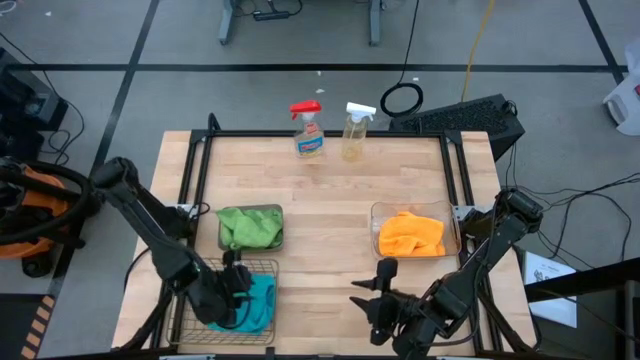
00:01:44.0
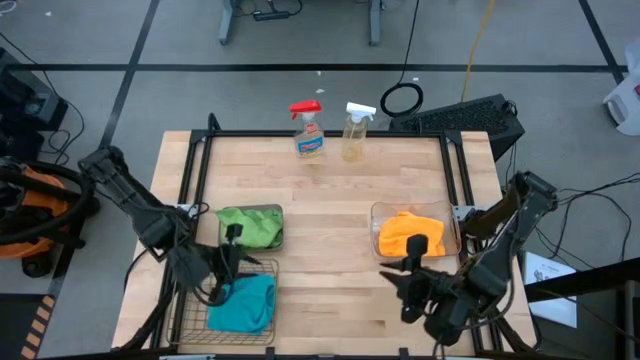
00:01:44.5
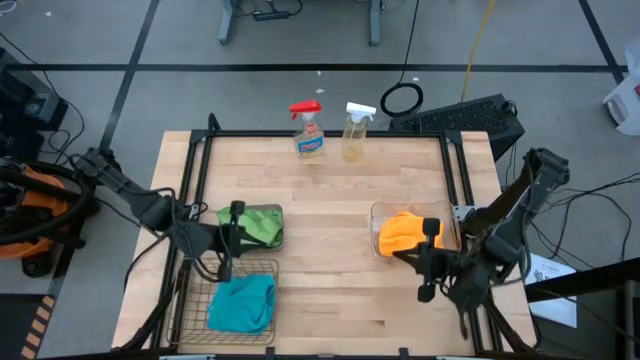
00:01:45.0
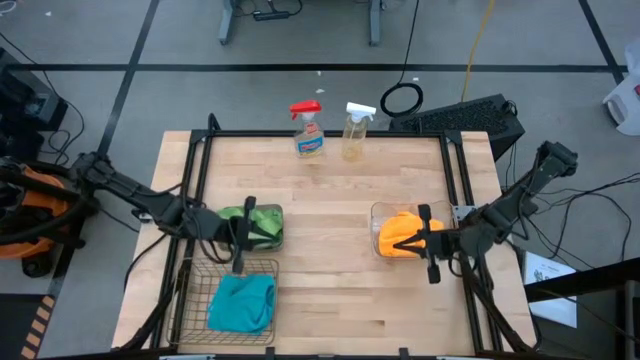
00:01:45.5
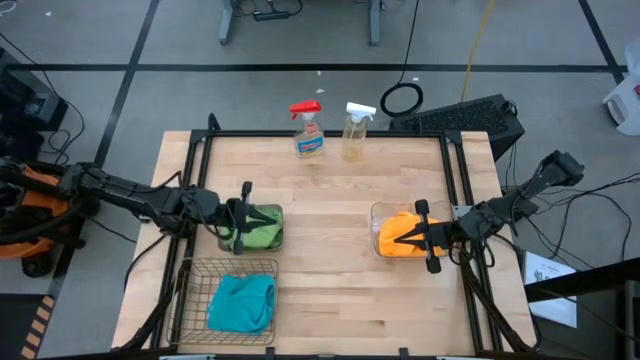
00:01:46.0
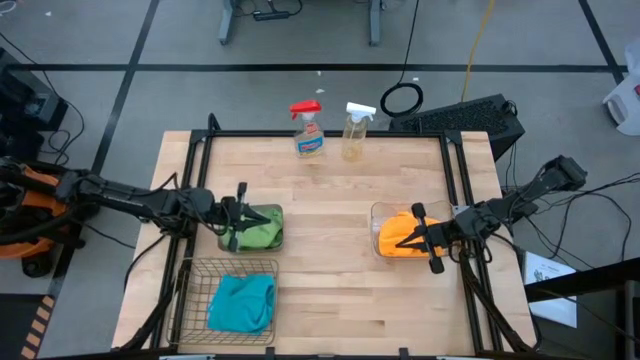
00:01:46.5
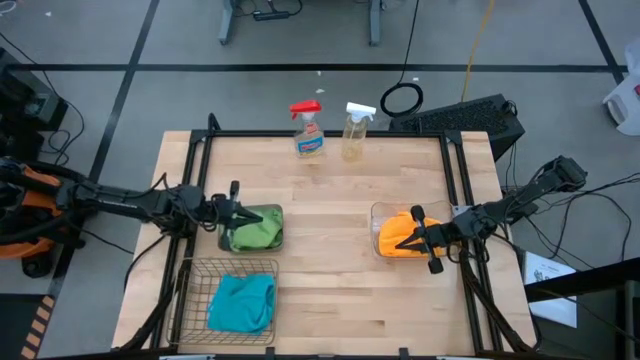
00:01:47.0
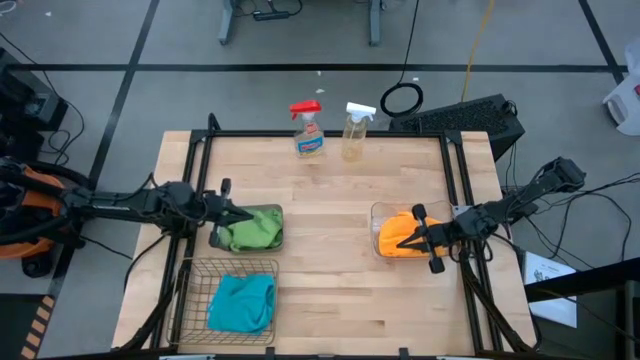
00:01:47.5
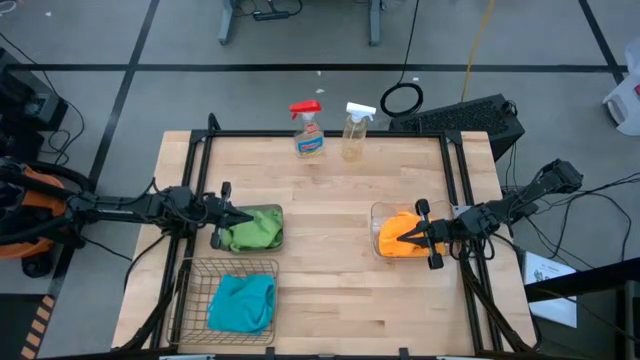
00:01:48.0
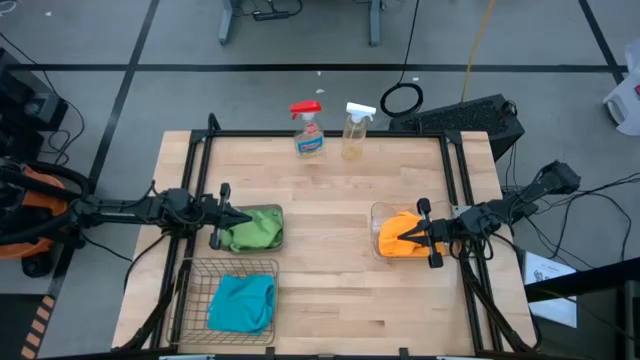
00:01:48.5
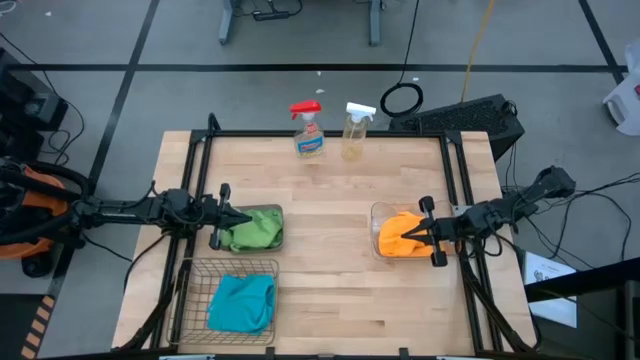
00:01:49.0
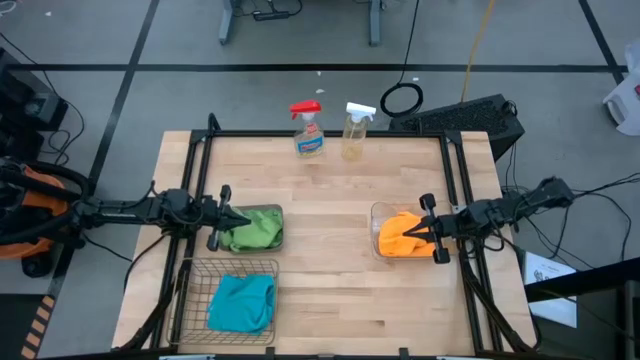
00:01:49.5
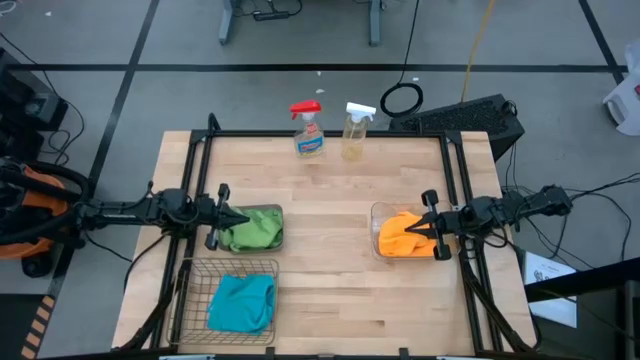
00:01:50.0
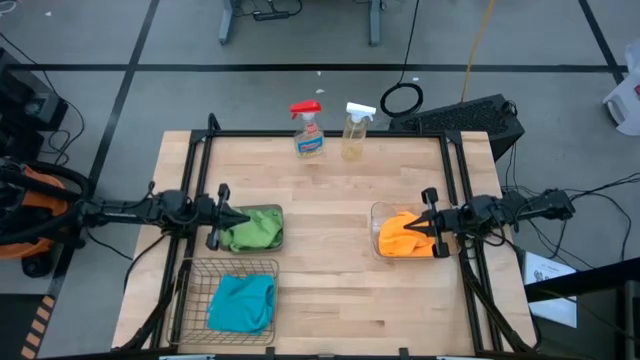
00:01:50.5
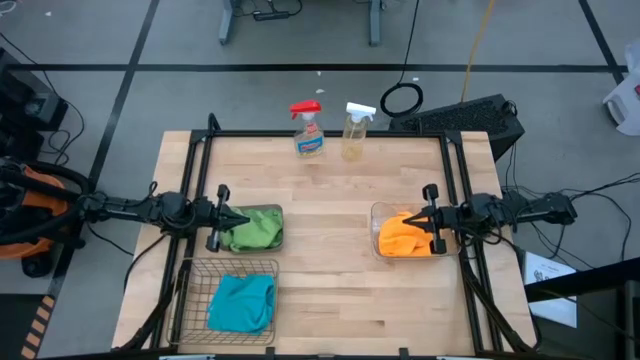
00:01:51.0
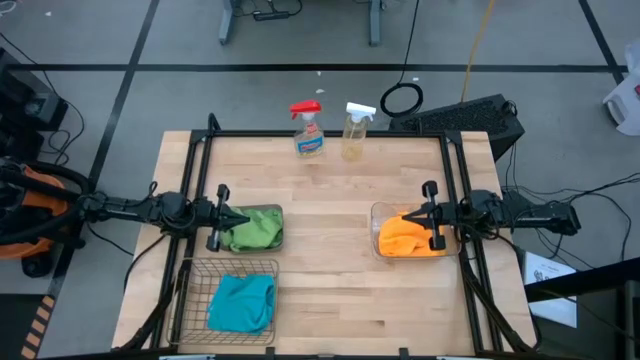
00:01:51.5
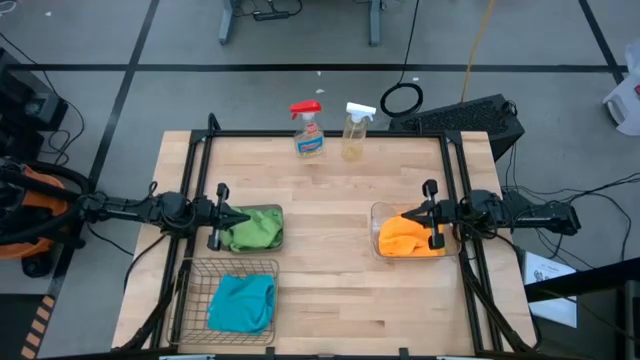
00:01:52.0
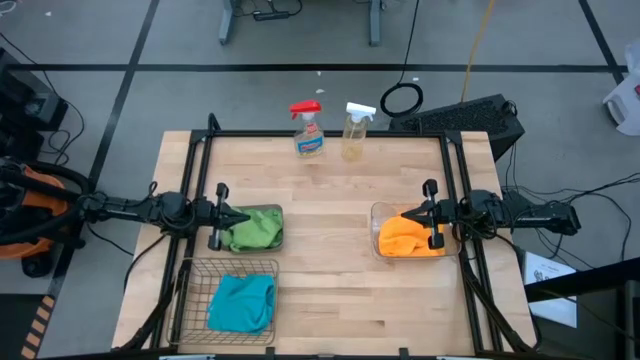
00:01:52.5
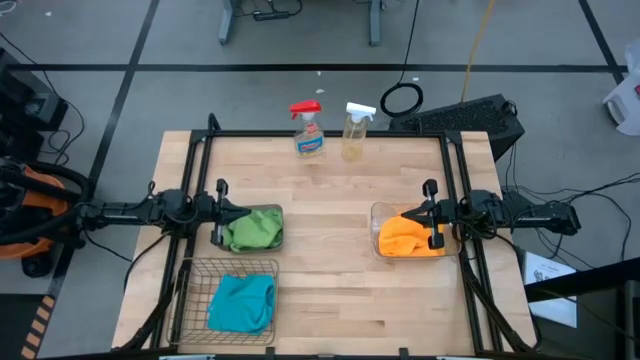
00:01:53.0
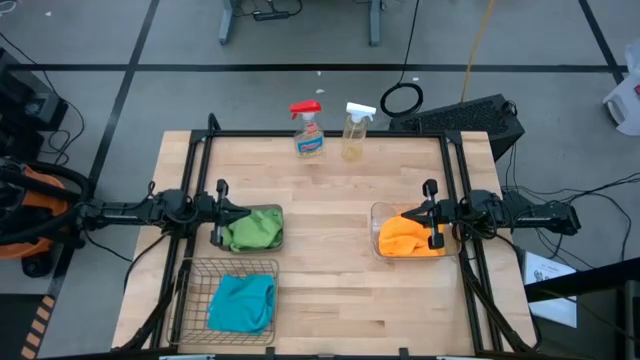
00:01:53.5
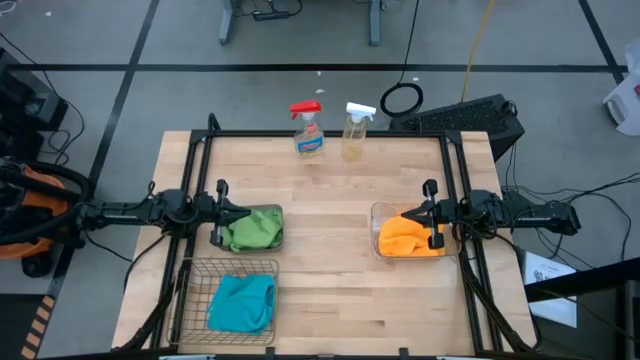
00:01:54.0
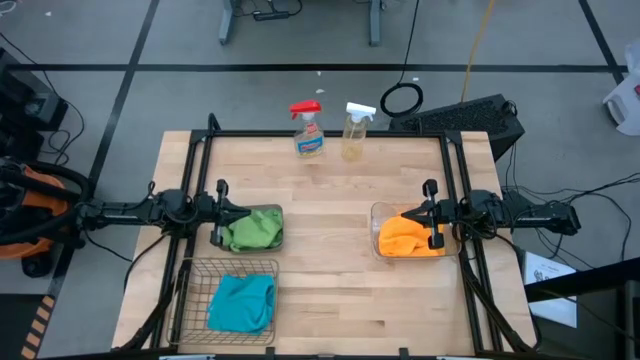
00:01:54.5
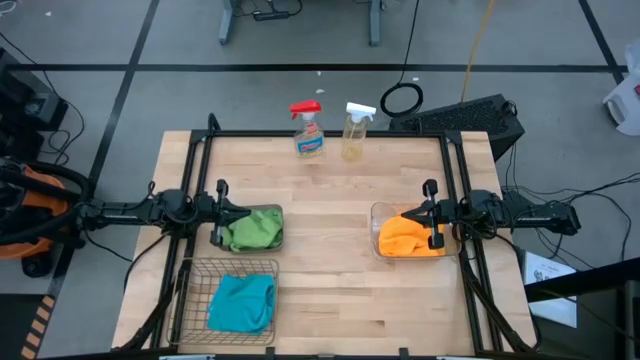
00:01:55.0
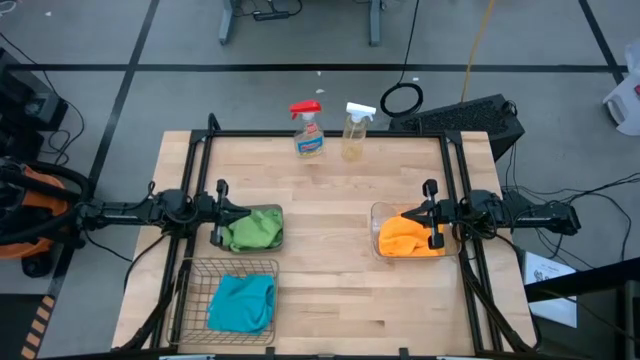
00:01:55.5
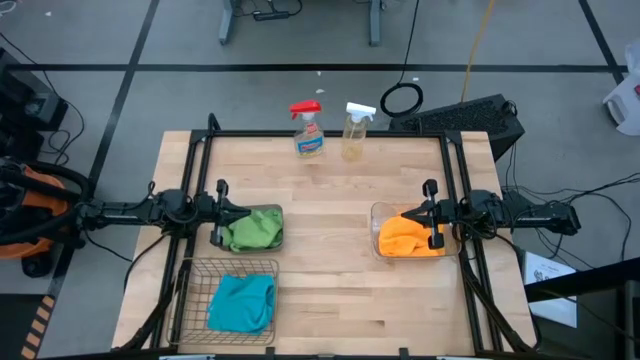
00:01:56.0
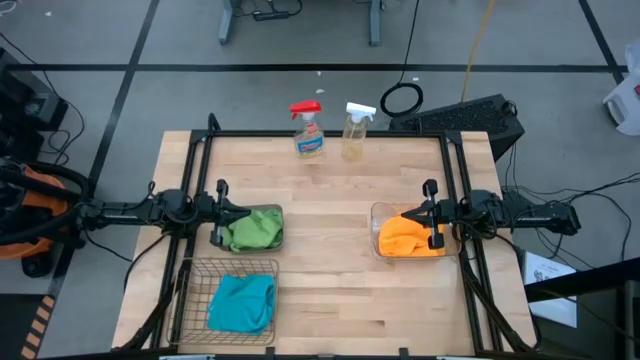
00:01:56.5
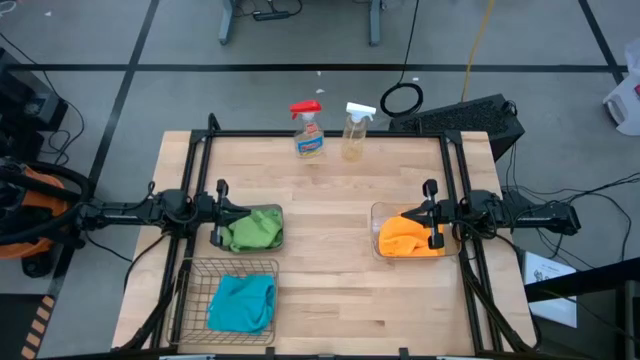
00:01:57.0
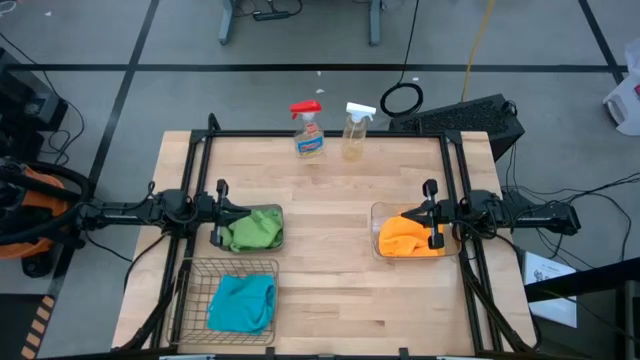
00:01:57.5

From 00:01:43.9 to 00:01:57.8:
Task: Sort microfiber towel by color & place in baskets
Return to Home Position

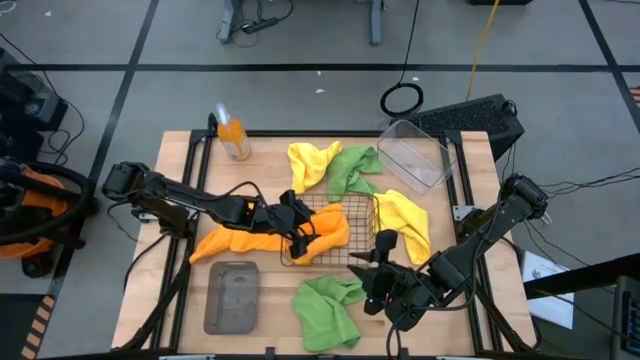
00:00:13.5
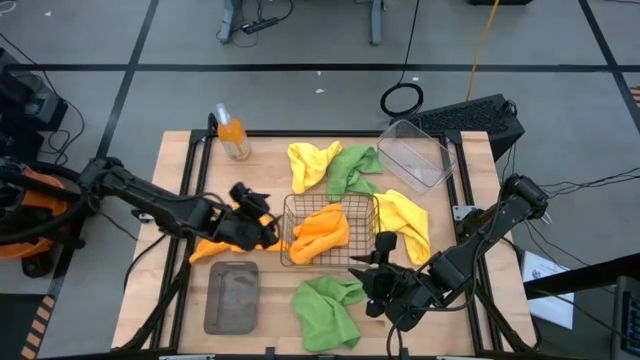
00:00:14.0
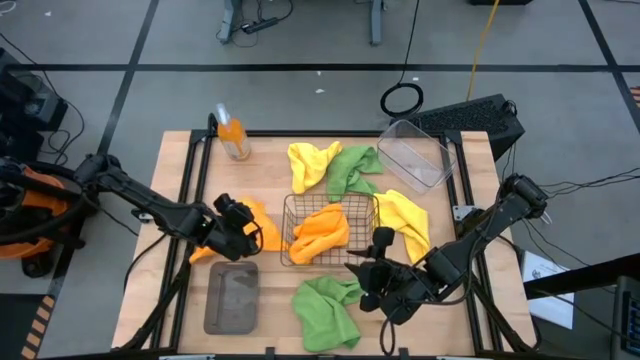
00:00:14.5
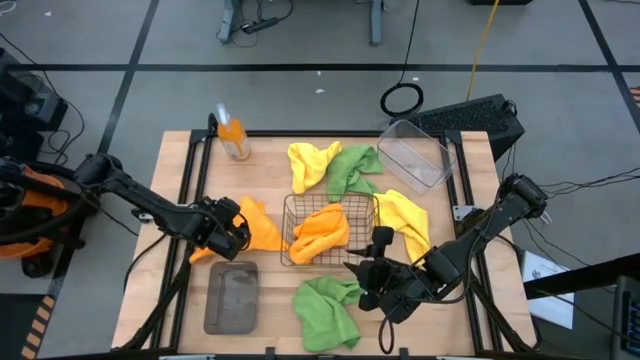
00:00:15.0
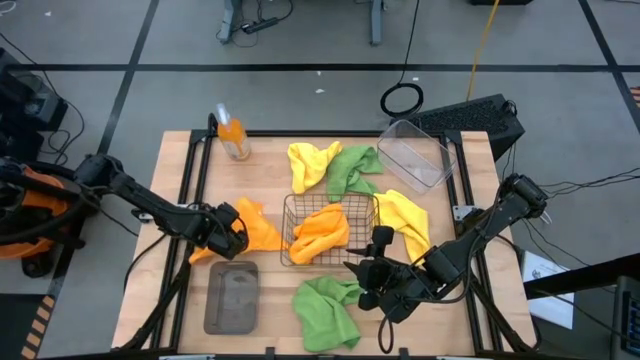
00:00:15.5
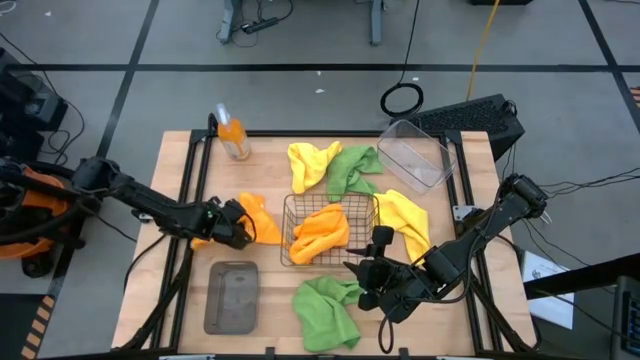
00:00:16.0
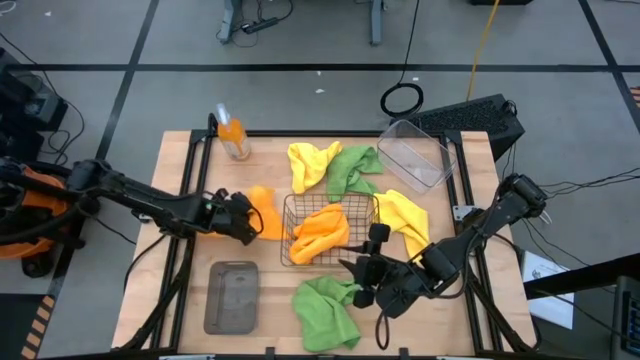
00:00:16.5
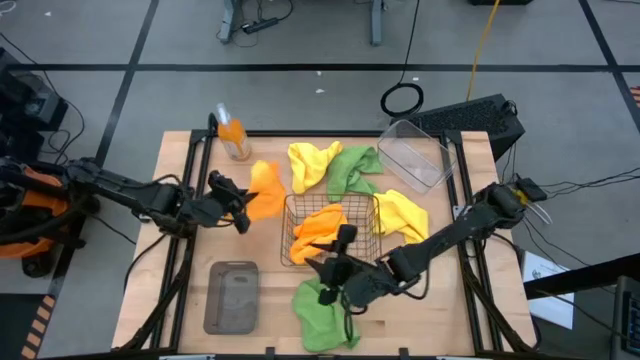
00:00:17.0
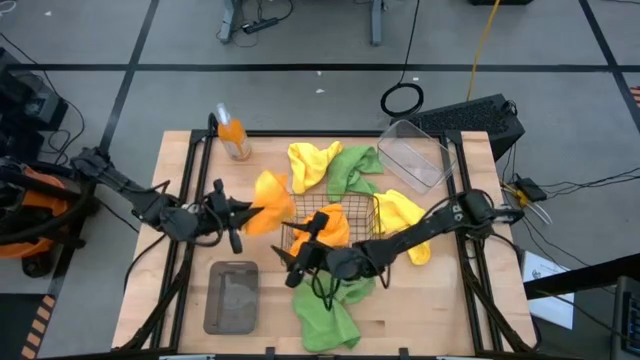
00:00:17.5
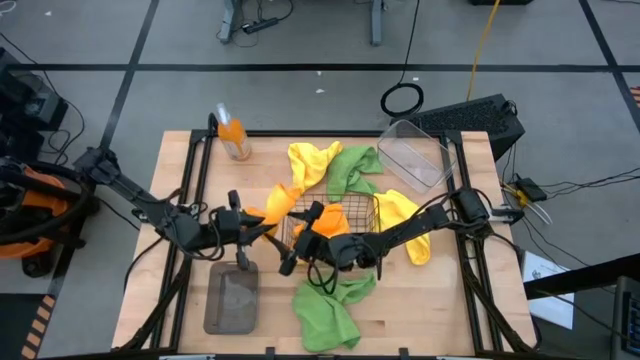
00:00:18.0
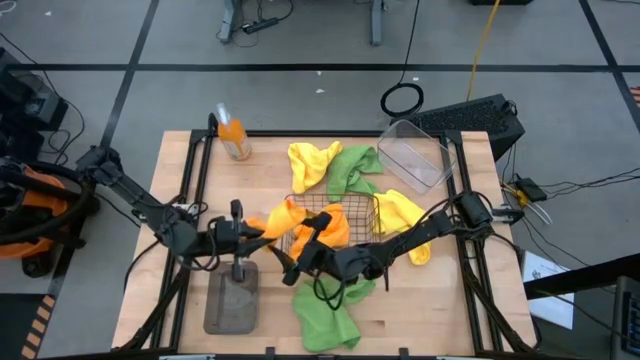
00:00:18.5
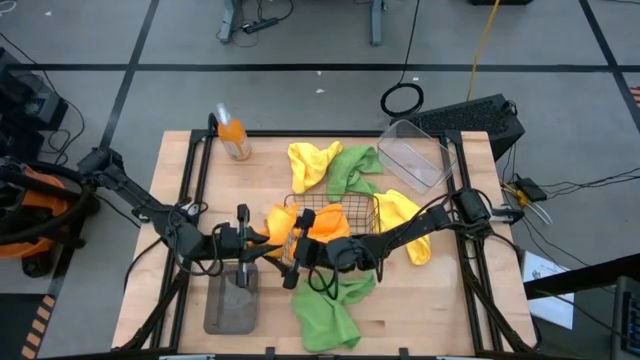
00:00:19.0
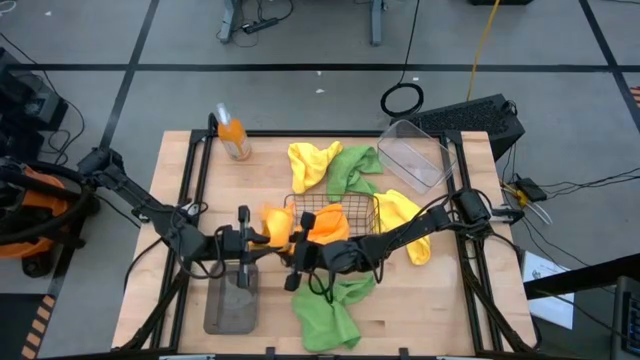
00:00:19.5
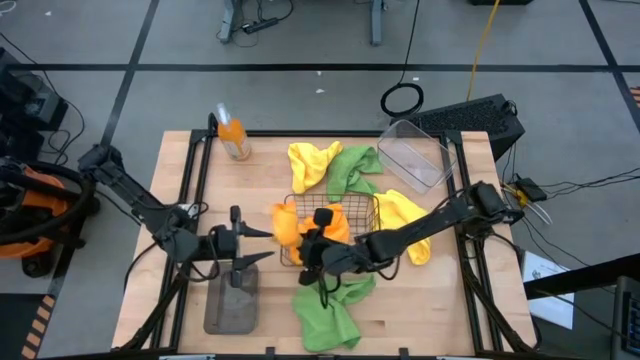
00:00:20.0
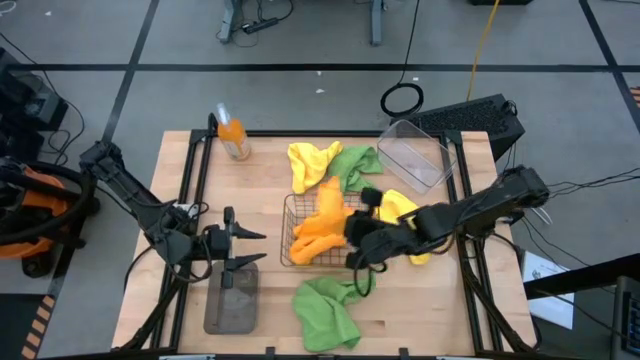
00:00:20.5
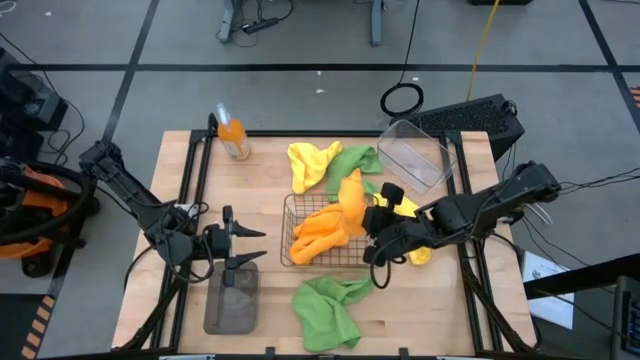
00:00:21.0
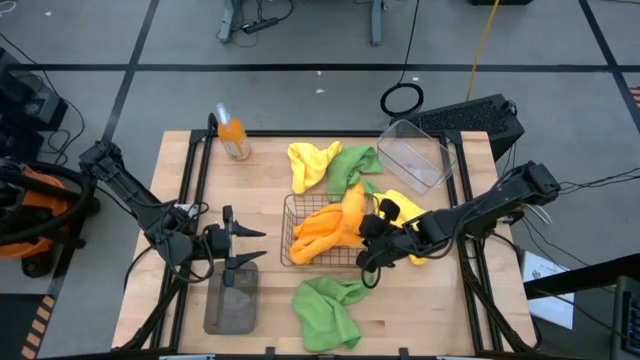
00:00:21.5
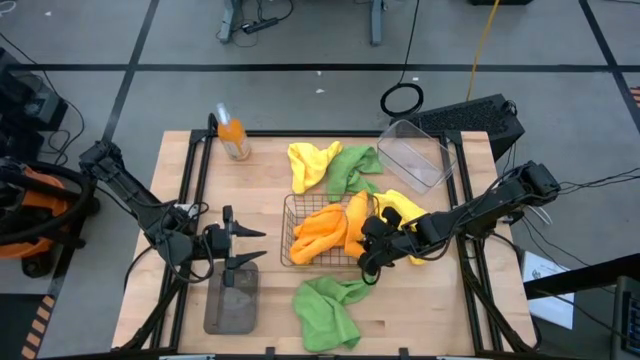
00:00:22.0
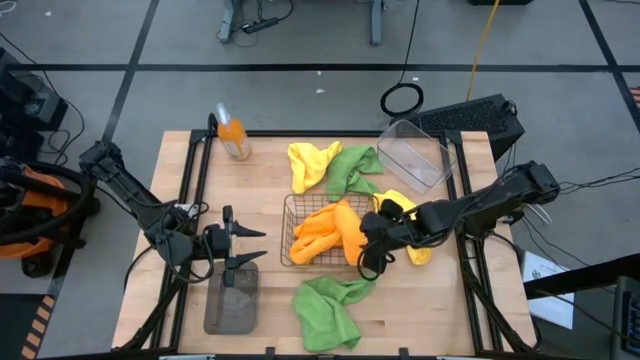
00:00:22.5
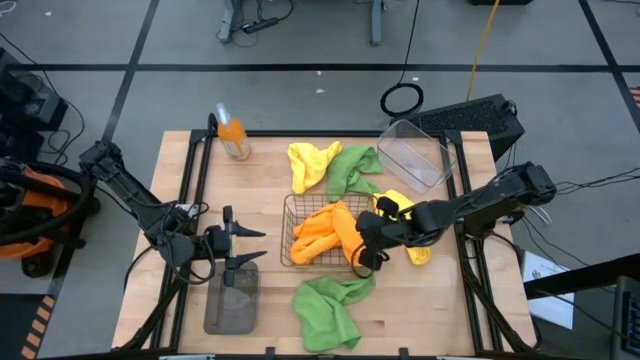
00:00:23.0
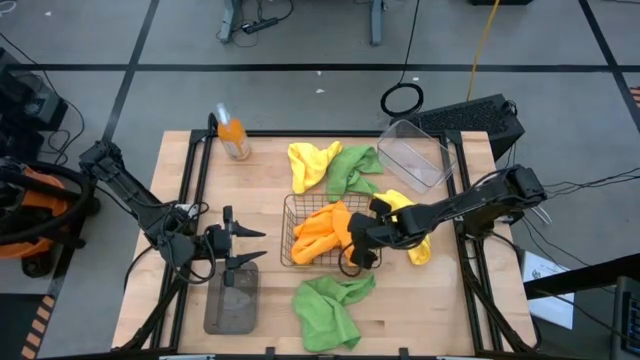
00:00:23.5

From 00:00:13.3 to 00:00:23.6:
Task: Sort microfiber towel by color & place in baskets
Put the orange microfiber towel into the wire basket
